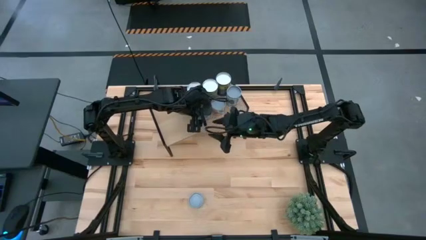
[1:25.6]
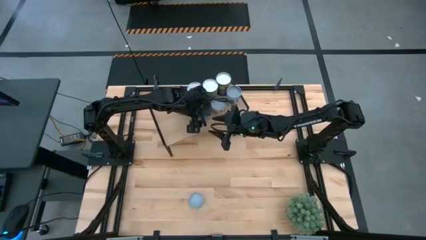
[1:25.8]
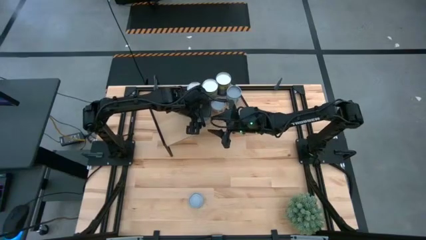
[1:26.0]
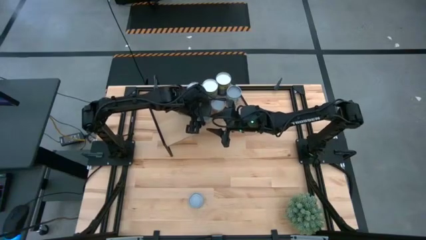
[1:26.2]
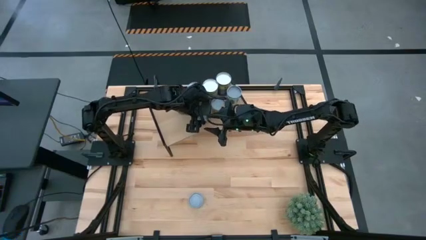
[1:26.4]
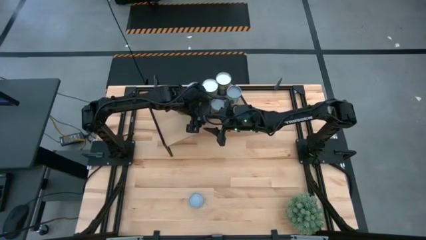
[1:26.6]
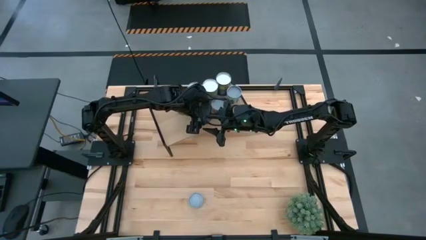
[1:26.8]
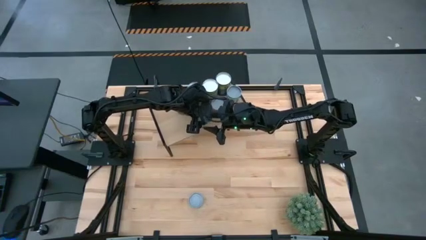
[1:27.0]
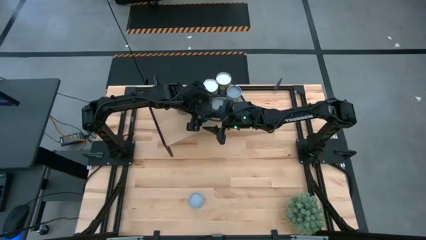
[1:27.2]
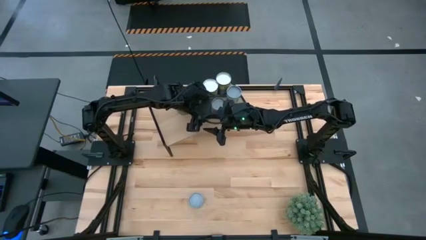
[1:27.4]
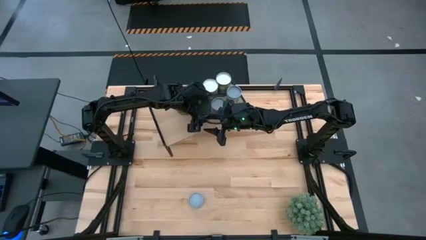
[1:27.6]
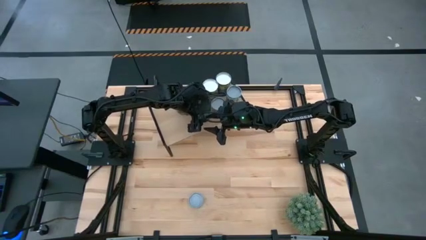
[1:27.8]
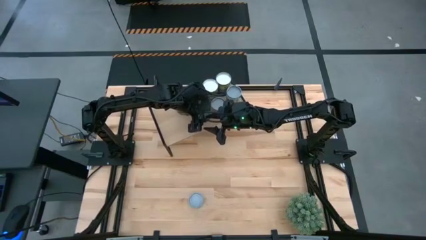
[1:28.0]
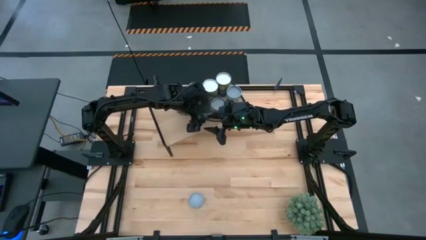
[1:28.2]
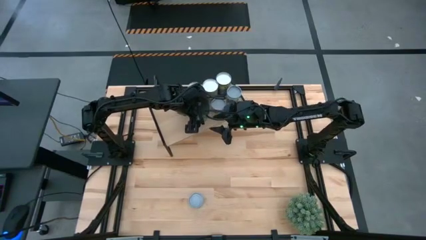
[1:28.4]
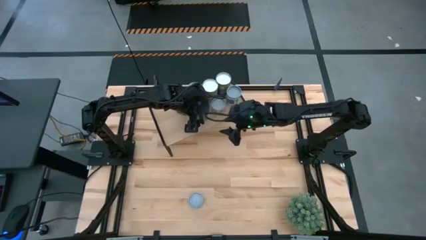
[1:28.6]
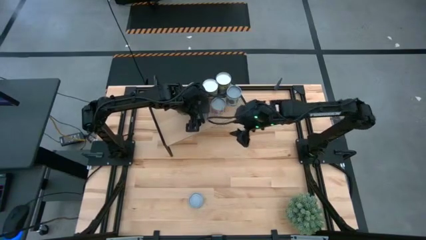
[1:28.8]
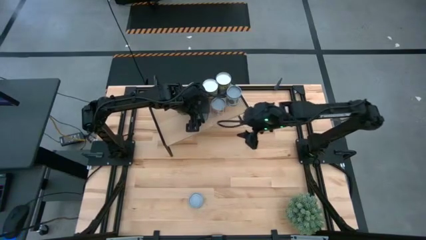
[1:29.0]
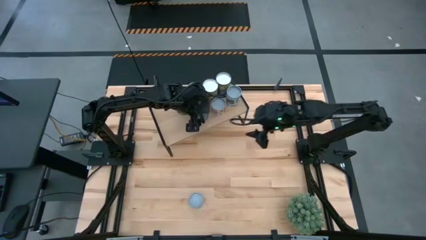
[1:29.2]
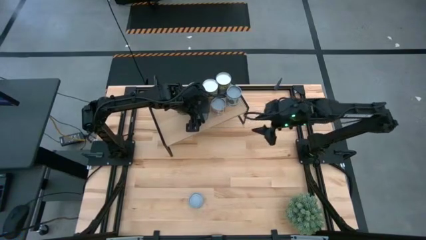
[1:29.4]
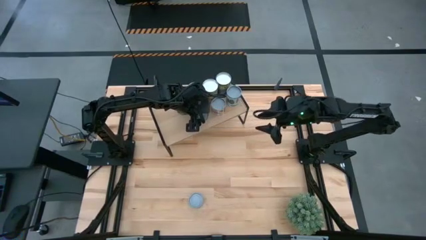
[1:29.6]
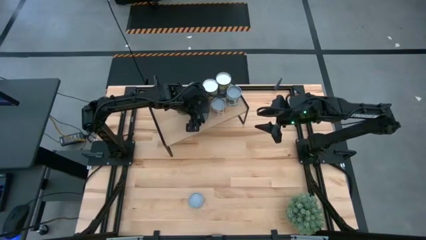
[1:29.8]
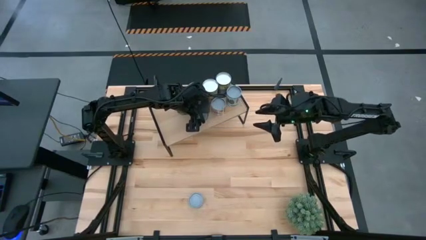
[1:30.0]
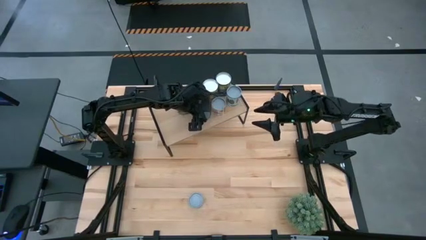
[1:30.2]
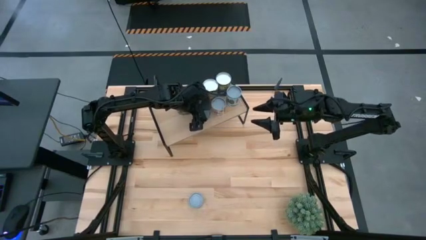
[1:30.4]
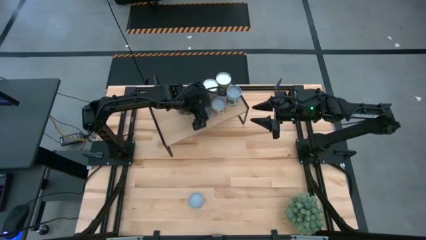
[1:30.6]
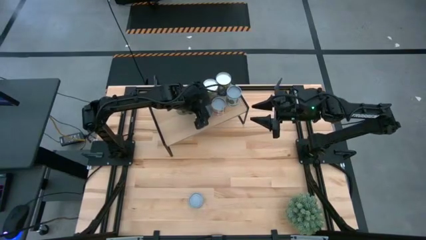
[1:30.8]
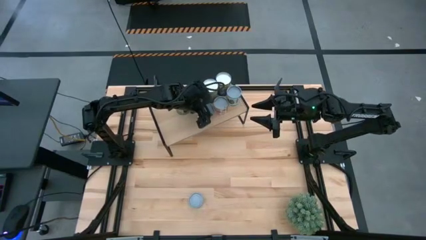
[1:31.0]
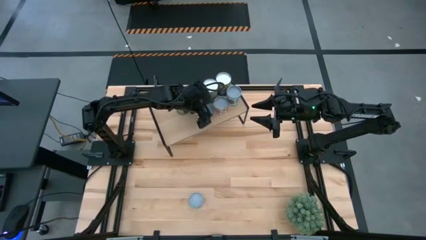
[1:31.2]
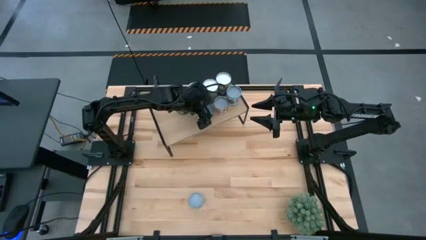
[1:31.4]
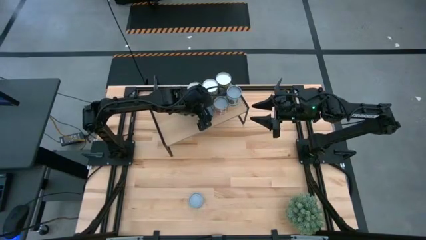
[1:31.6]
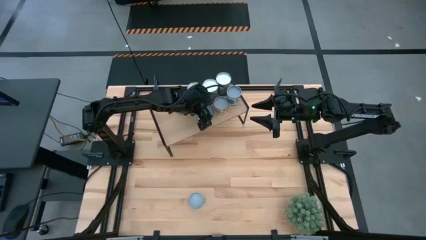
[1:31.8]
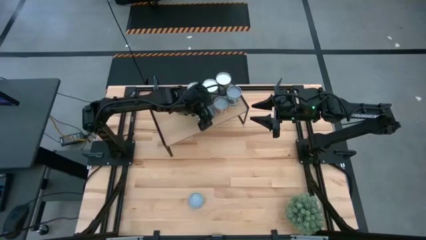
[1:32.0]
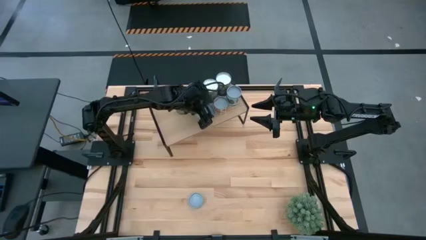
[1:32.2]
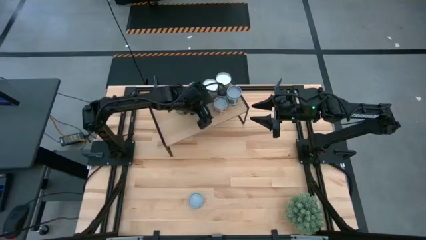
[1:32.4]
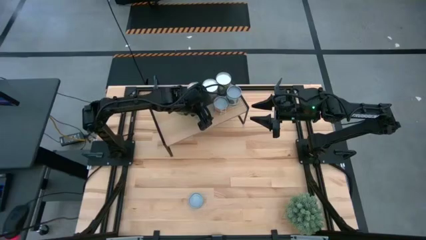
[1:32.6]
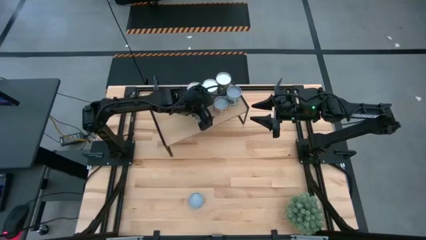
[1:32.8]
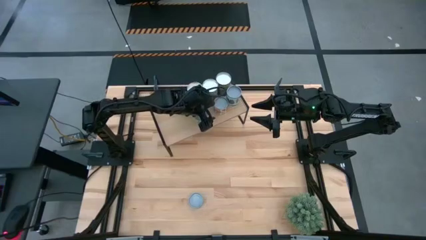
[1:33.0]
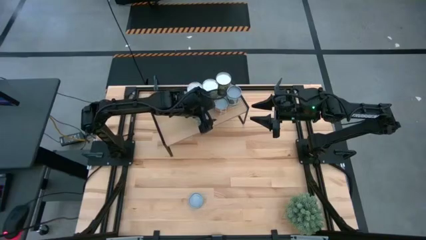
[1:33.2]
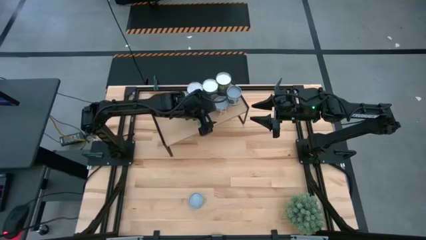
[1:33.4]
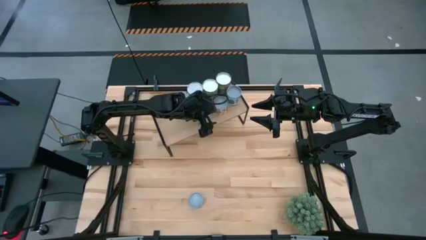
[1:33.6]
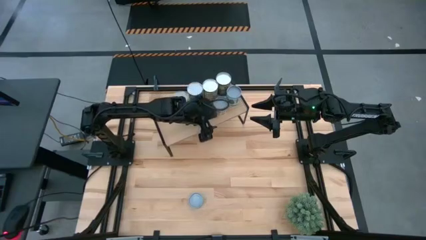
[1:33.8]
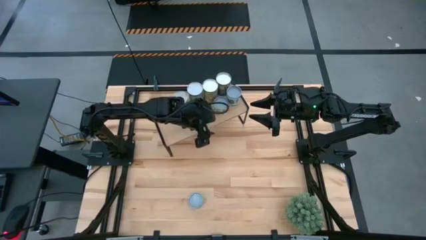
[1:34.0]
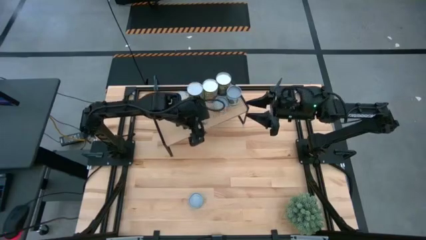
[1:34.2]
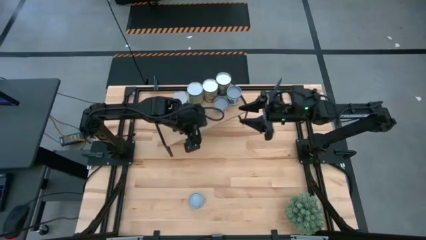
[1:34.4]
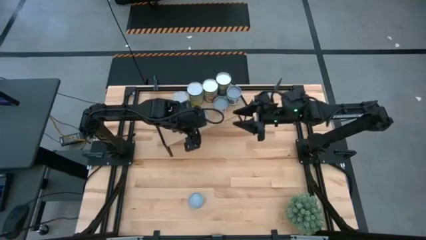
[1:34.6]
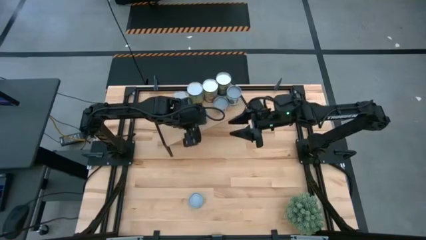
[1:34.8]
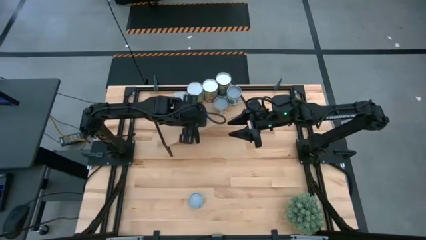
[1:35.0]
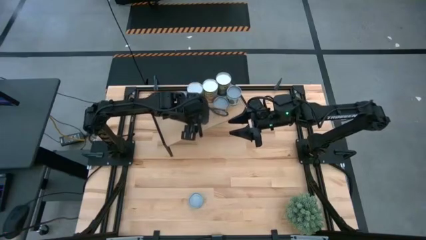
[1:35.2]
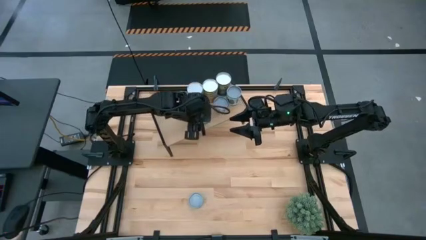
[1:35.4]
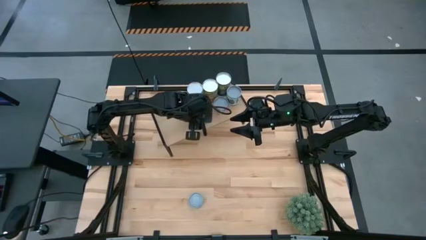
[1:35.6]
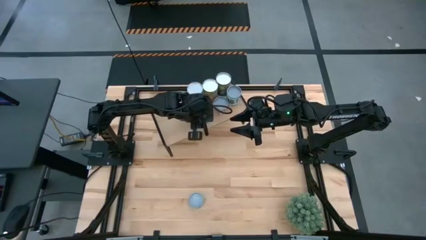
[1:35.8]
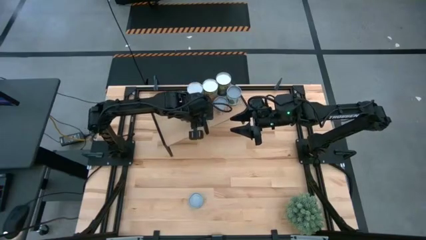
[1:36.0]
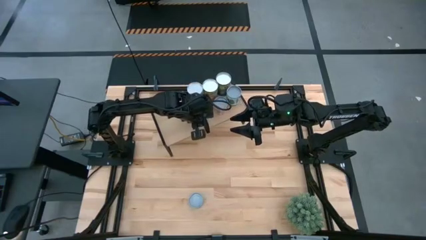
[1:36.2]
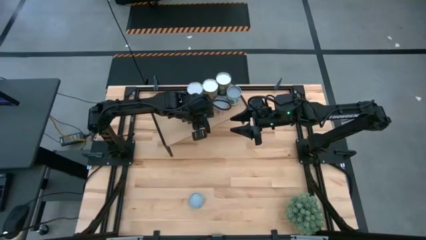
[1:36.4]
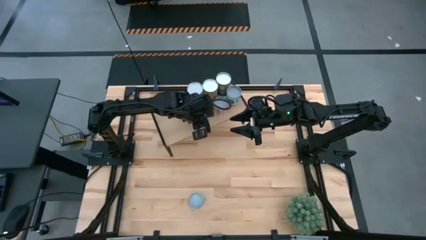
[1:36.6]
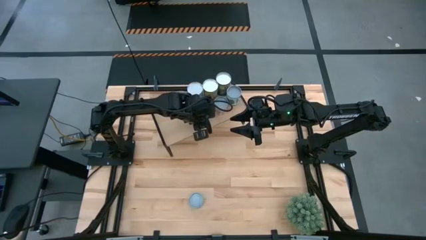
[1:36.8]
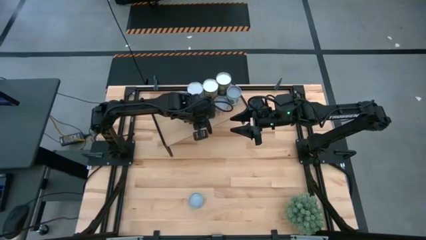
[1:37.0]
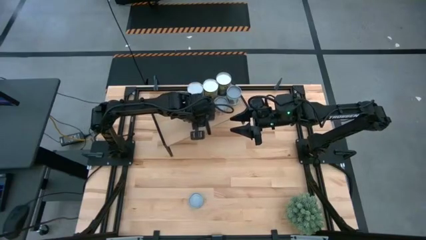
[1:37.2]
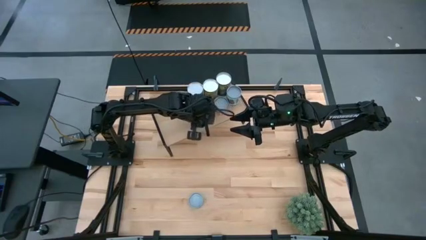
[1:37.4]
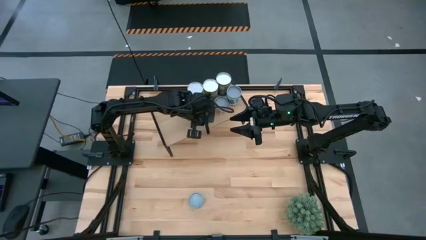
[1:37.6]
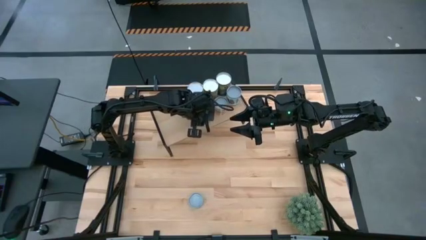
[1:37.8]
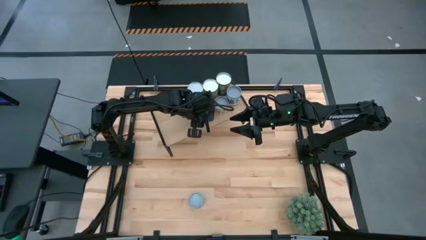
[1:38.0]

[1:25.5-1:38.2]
Task: Pick and place cans onto a shelf
Put the canned green peas on the shelf
